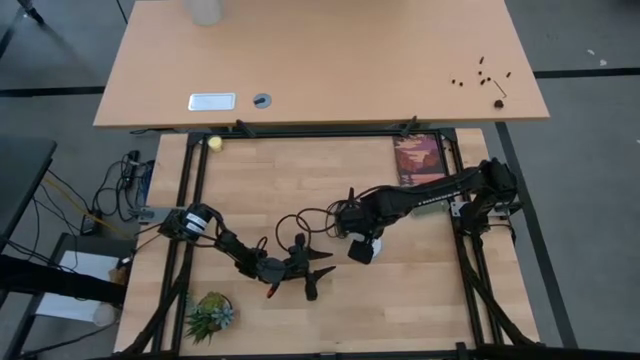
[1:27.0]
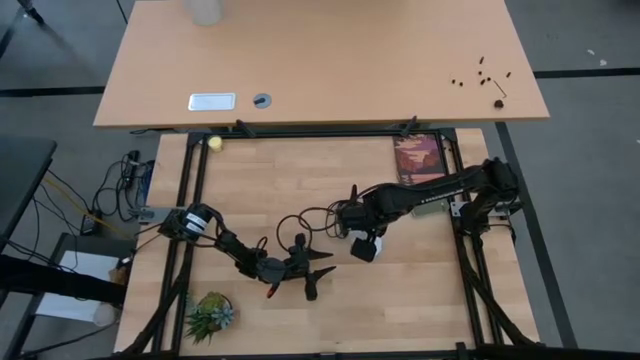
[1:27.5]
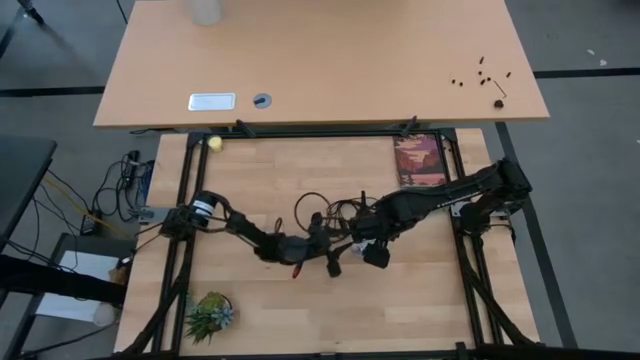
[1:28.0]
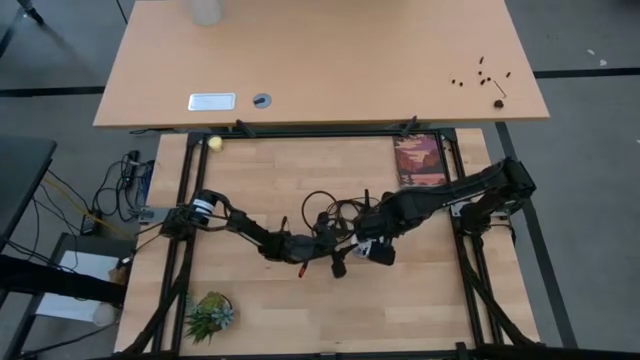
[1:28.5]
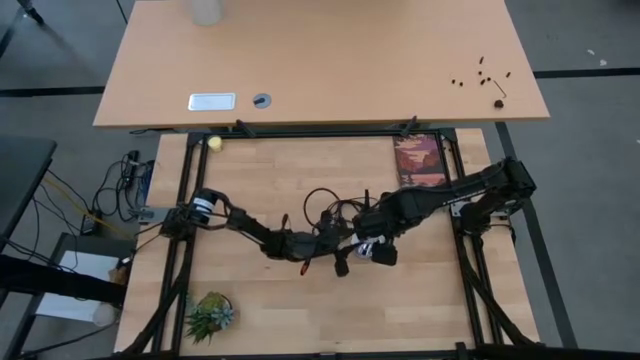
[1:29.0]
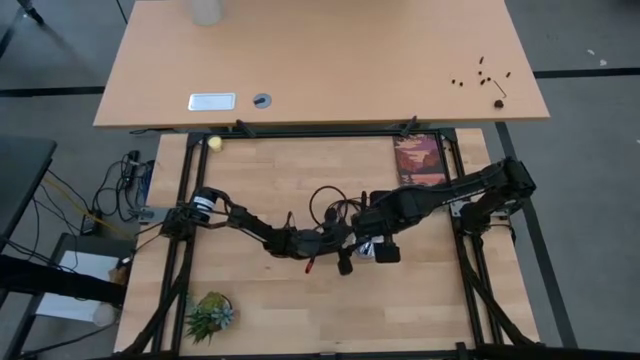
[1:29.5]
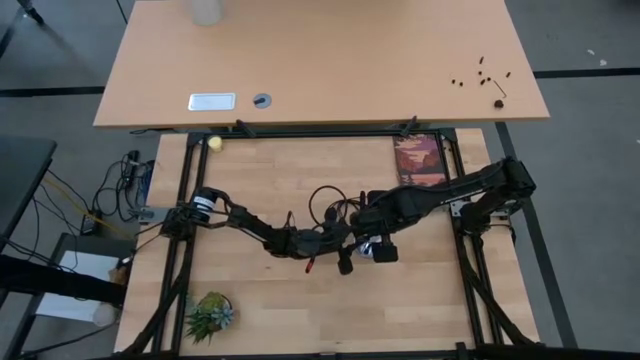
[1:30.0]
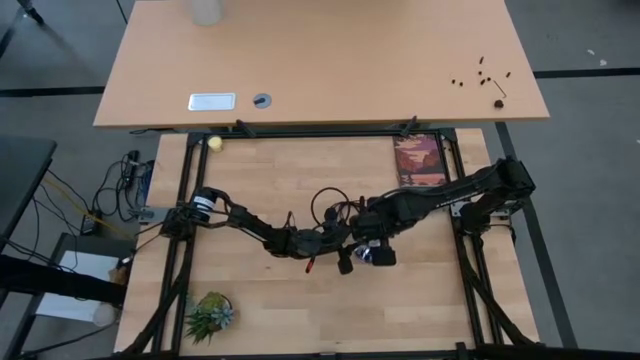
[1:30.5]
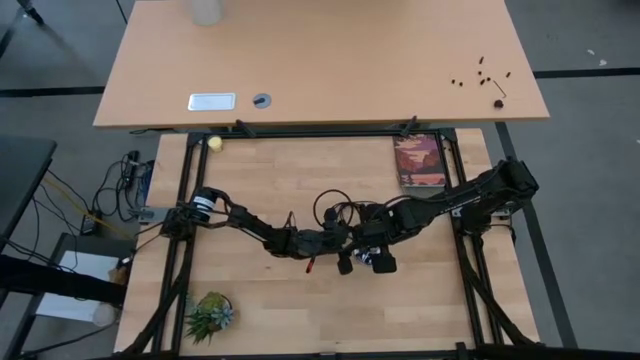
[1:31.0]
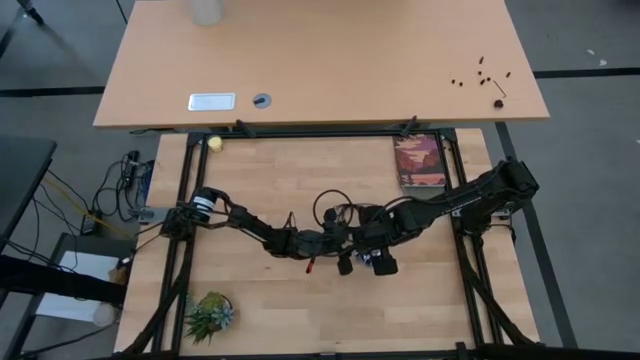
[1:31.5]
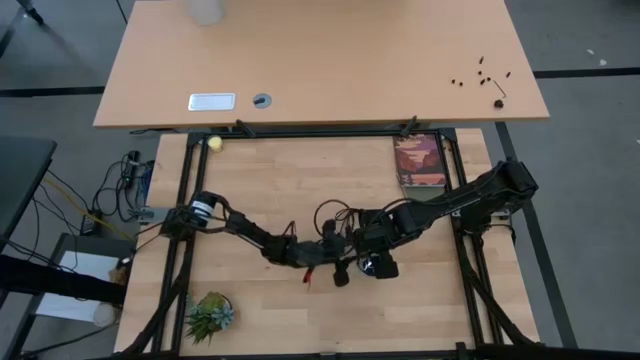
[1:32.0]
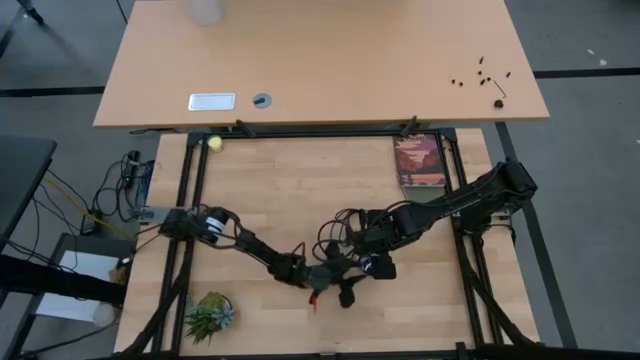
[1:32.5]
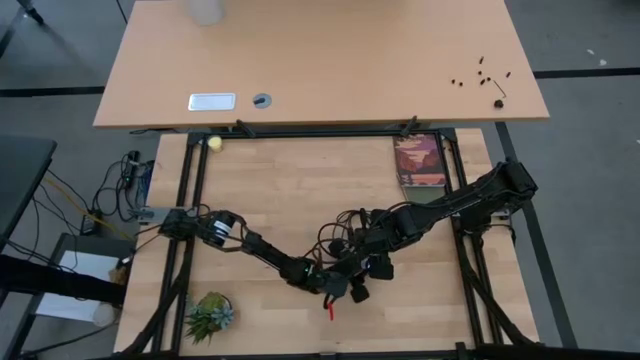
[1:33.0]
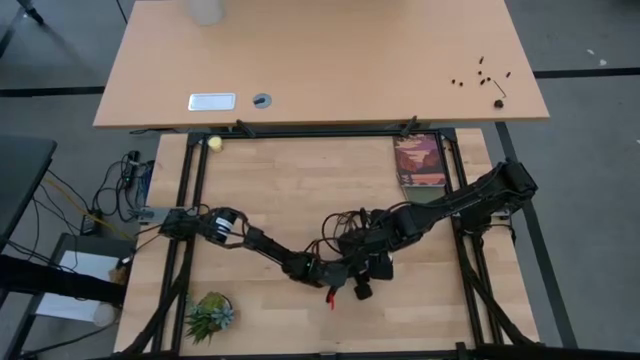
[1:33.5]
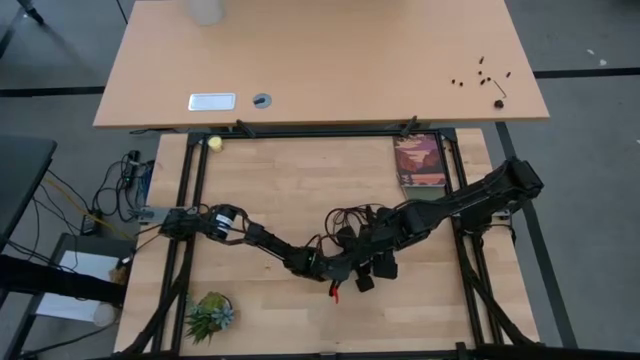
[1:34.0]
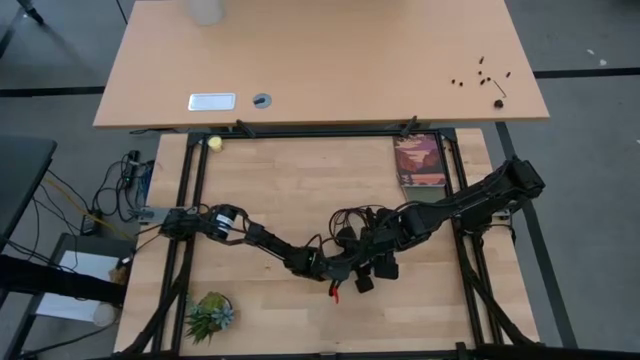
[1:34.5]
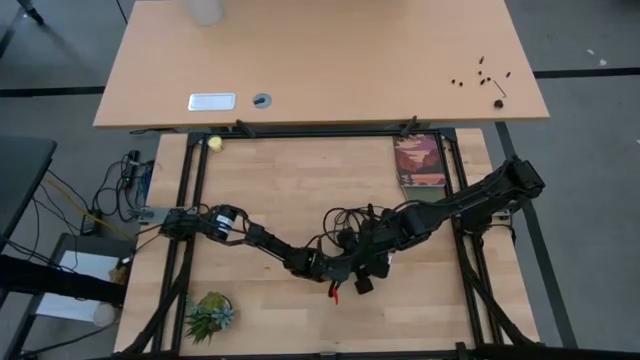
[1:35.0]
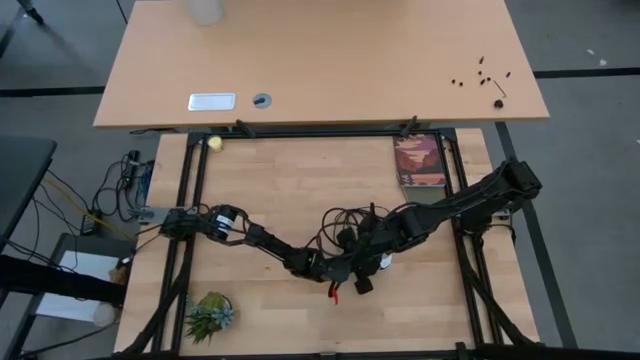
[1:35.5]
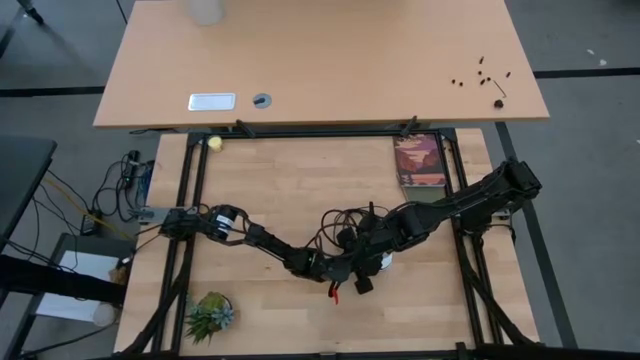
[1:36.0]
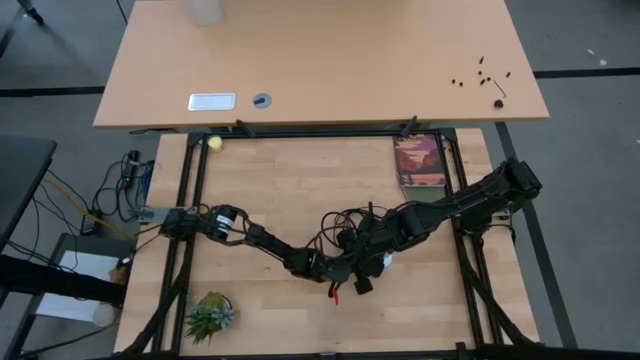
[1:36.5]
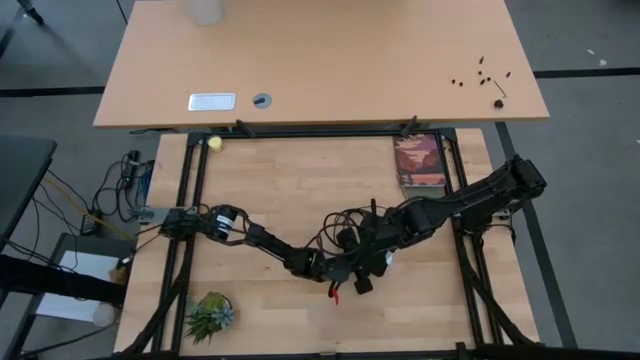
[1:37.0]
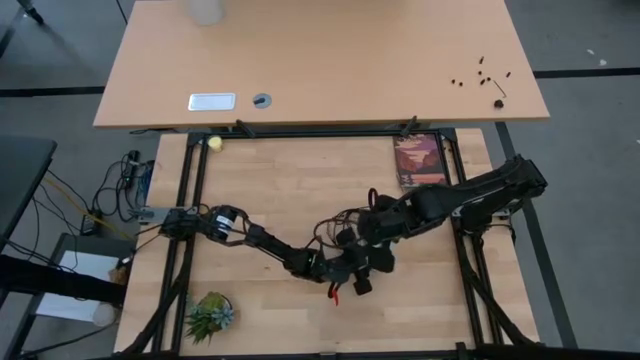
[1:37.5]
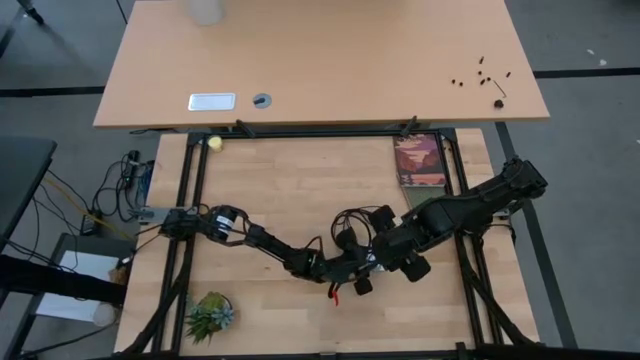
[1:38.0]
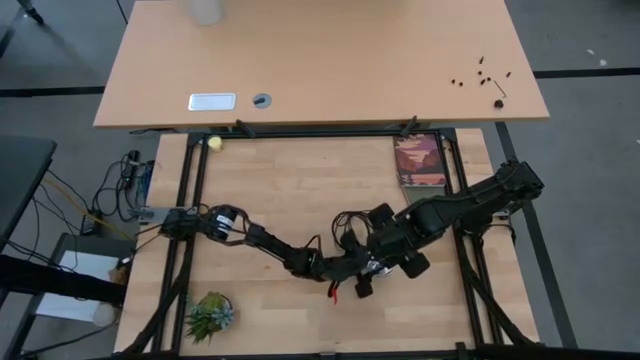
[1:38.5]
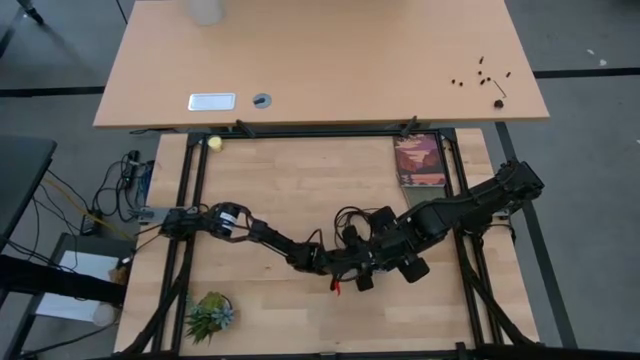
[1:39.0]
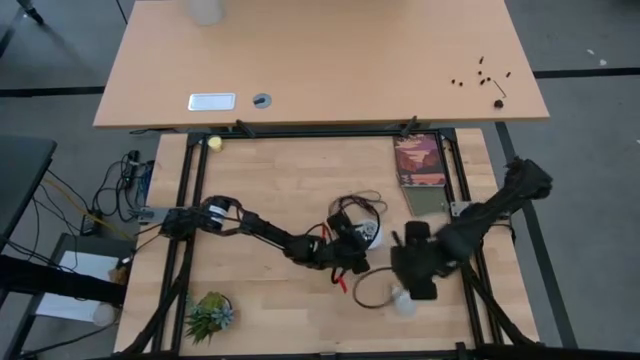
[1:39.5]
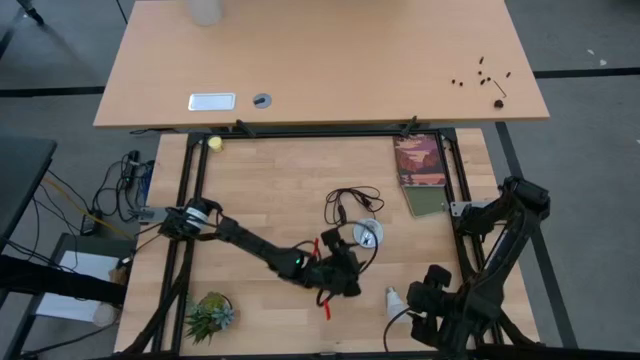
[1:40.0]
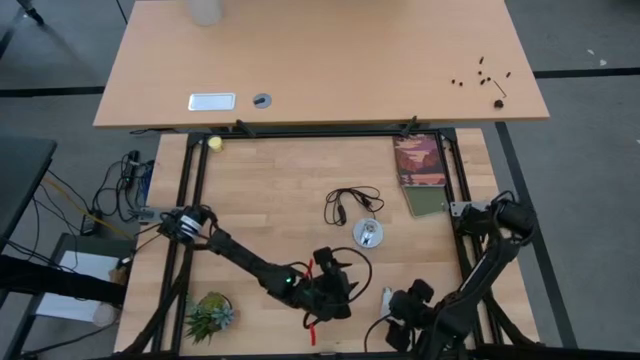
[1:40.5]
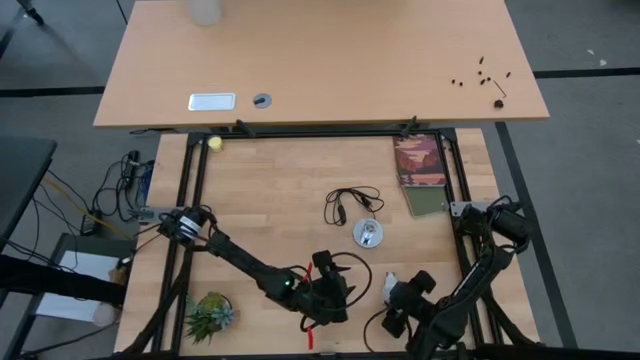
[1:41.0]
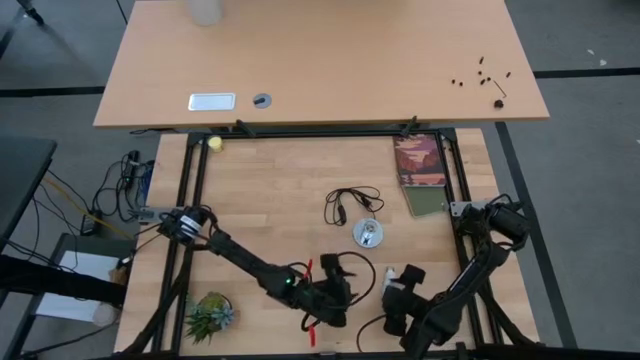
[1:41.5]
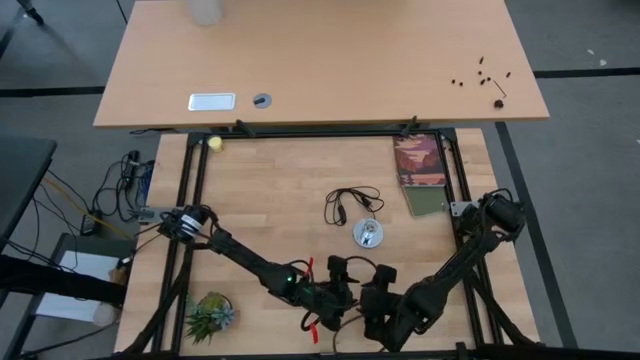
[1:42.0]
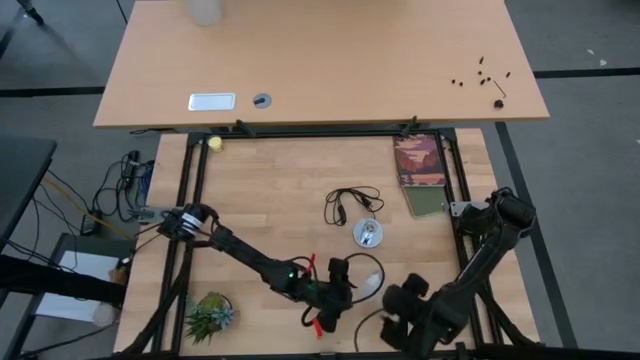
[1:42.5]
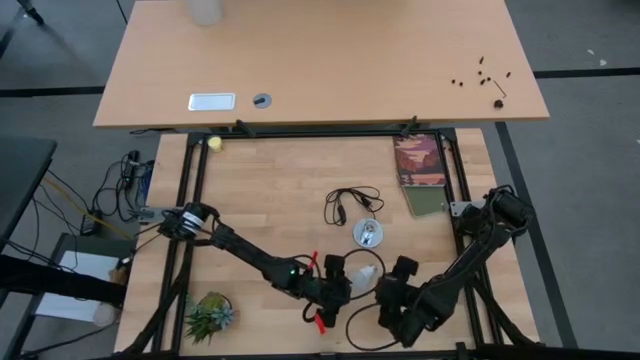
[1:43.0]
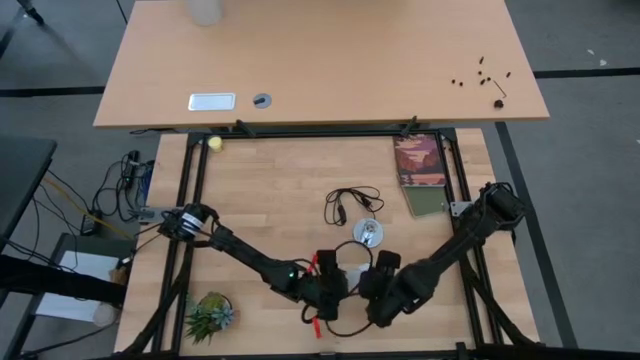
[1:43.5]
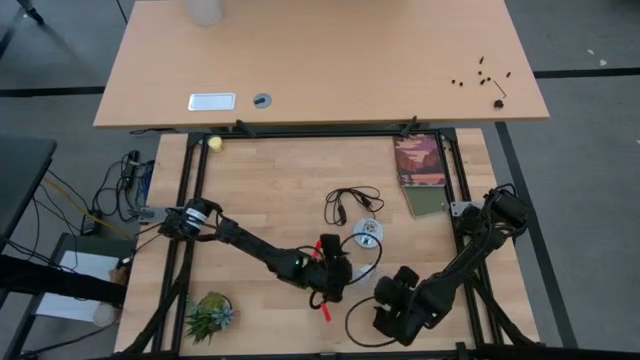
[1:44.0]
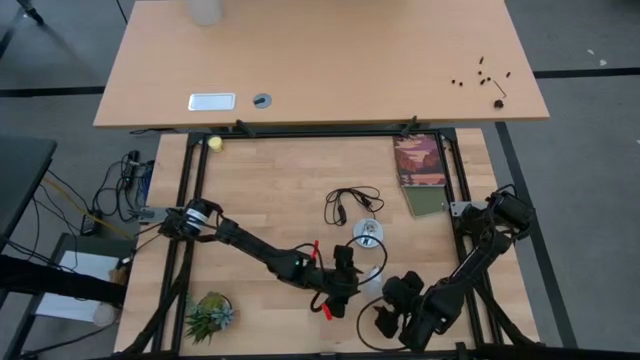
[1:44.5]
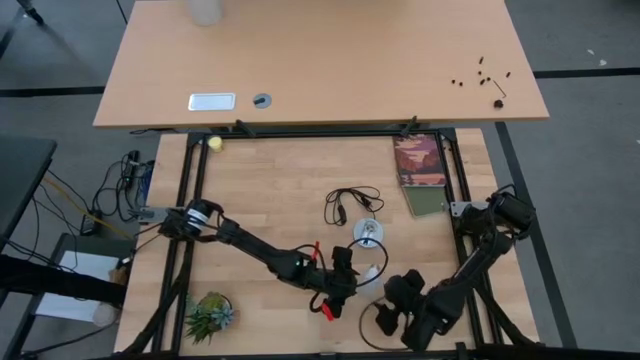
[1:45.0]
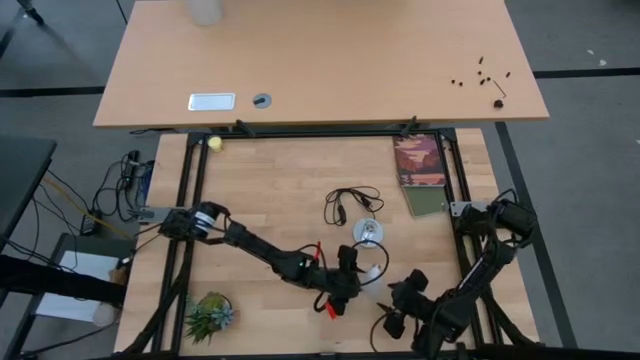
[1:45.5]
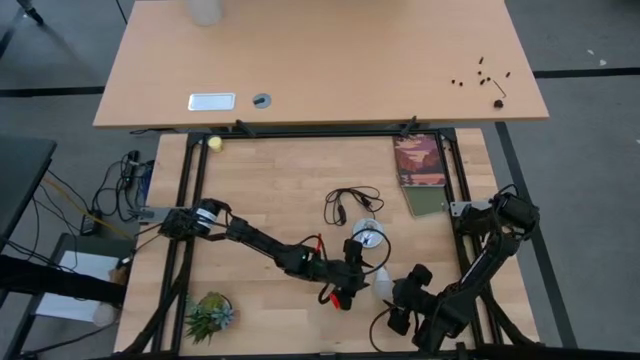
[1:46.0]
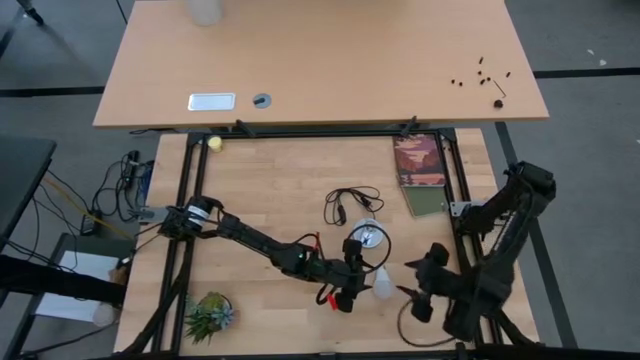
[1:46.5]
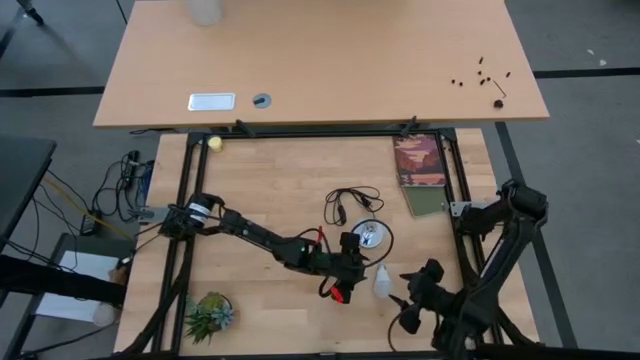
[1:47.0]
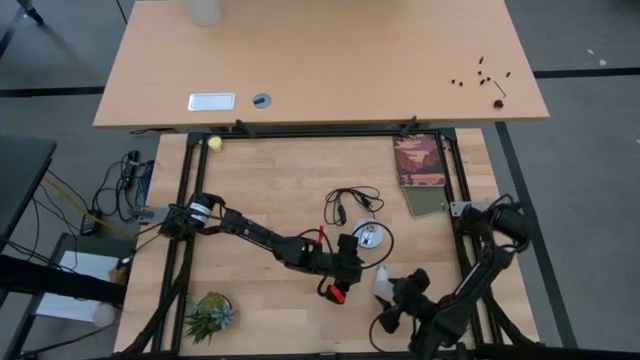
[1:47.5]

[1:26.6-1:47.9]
Task: Screw lightbulb
Insert the lightbulb into the silver lamp

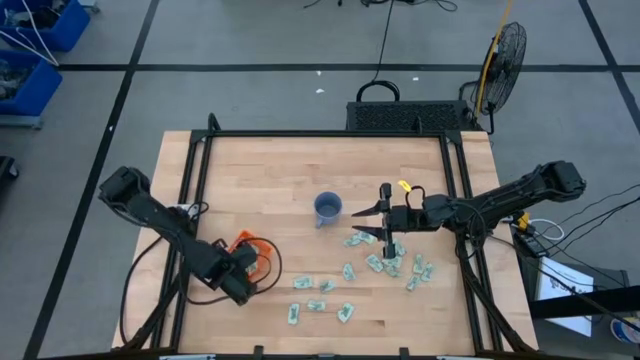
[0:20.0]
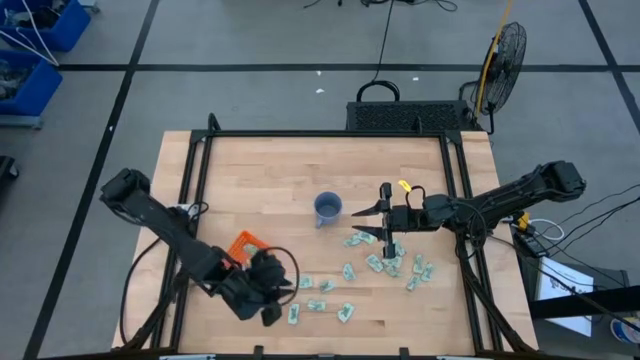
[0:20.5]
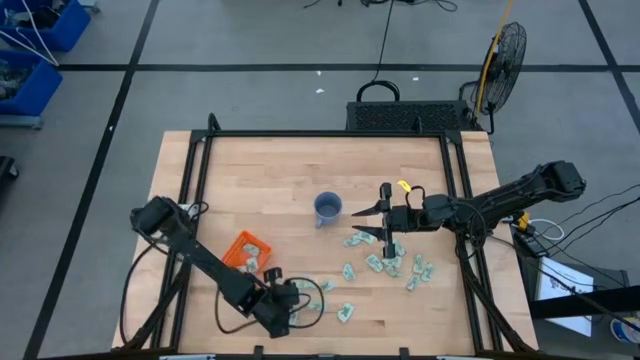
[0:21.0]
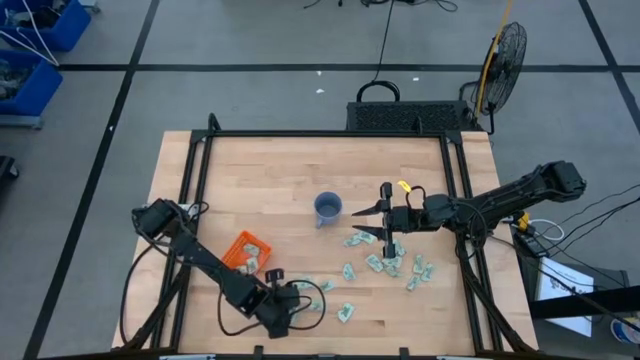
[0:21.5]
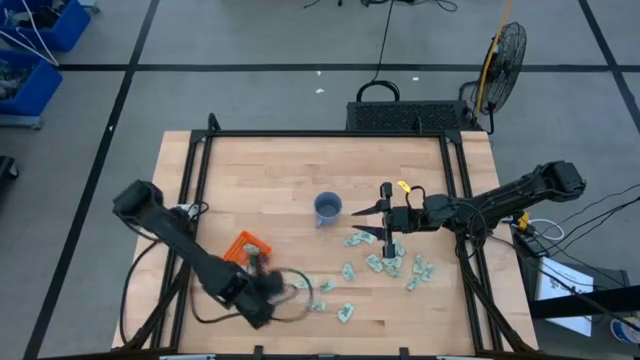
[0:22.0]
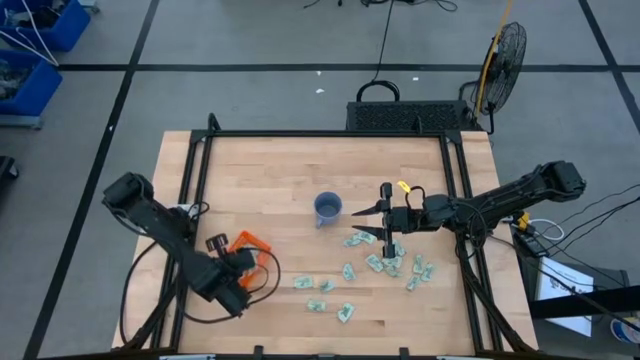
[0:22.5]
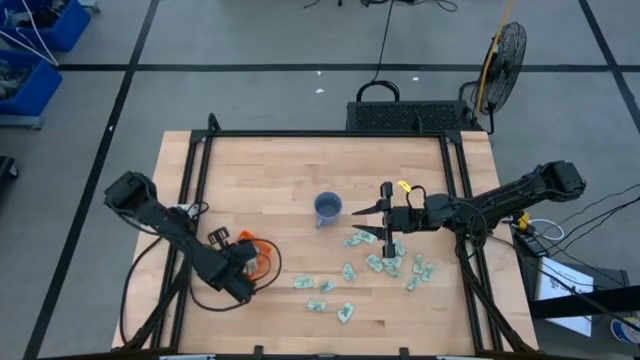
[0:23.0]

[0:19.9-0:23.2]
Task: Pick and place Stevia / Truvia into bins
Put the green stevia packet into the orange basket
